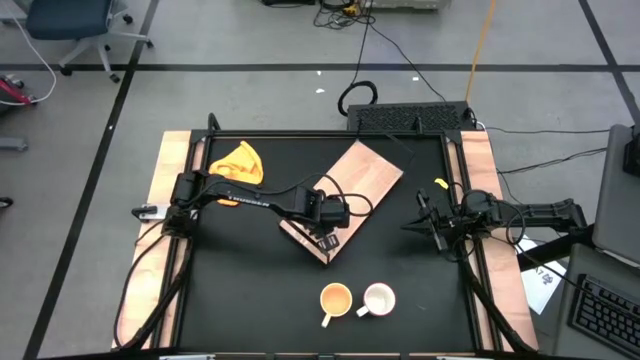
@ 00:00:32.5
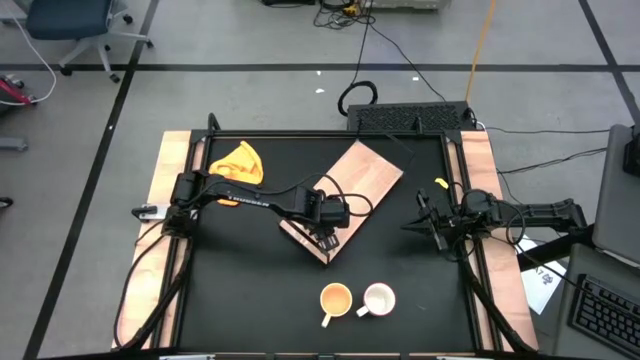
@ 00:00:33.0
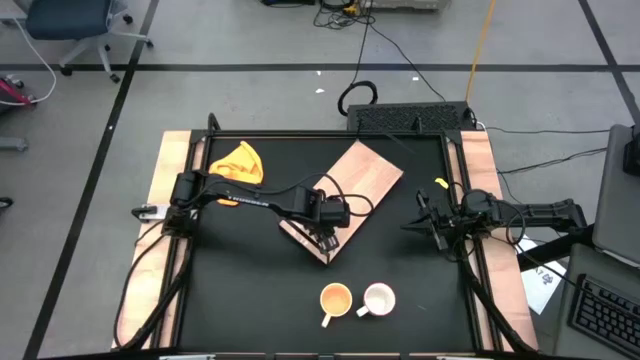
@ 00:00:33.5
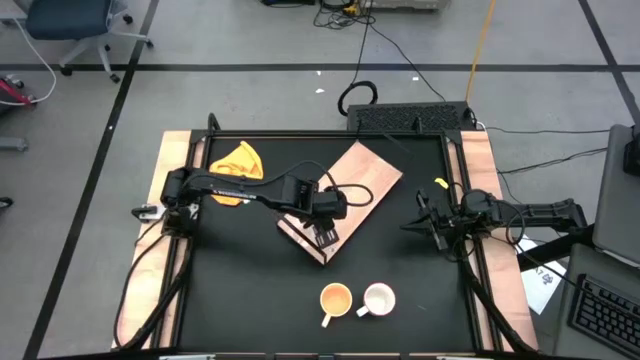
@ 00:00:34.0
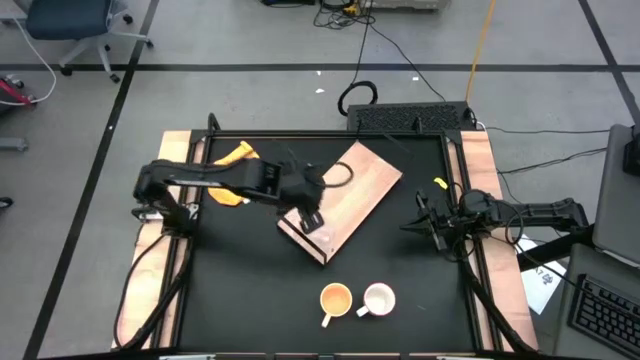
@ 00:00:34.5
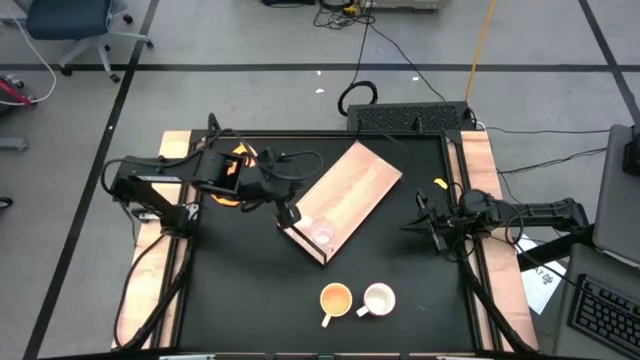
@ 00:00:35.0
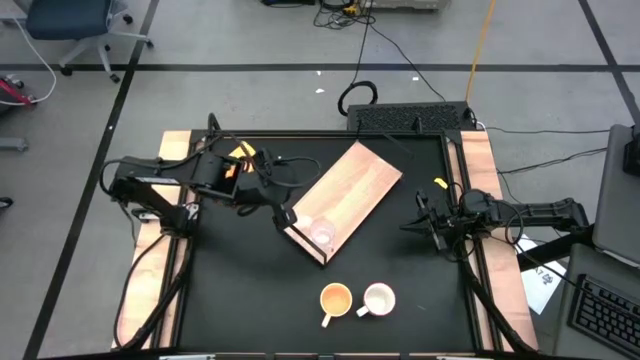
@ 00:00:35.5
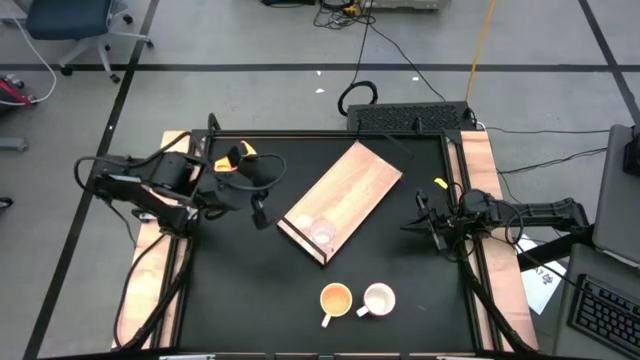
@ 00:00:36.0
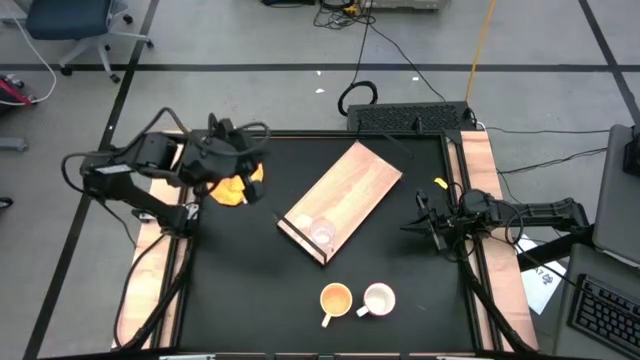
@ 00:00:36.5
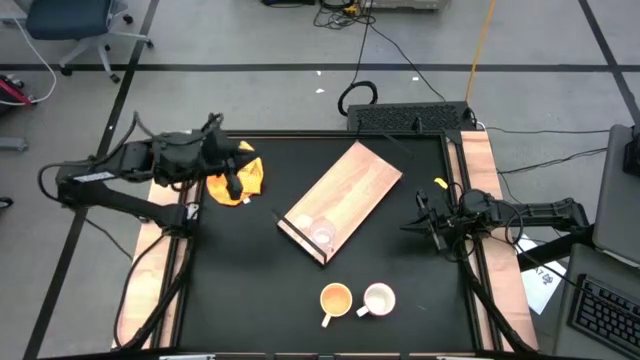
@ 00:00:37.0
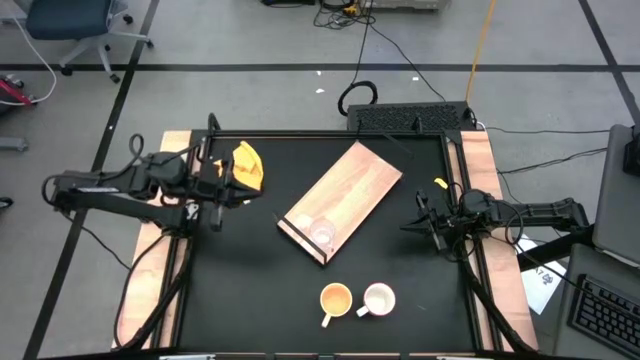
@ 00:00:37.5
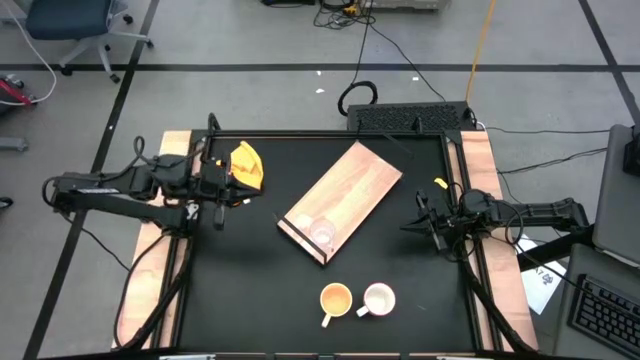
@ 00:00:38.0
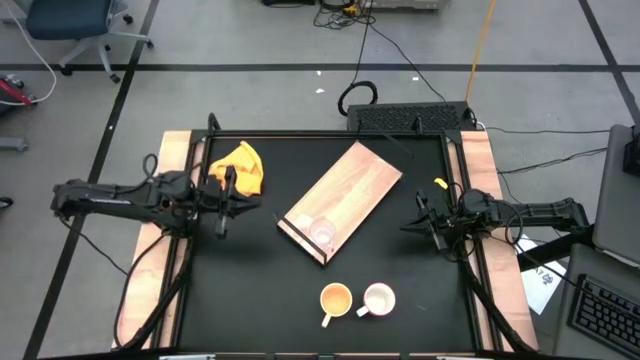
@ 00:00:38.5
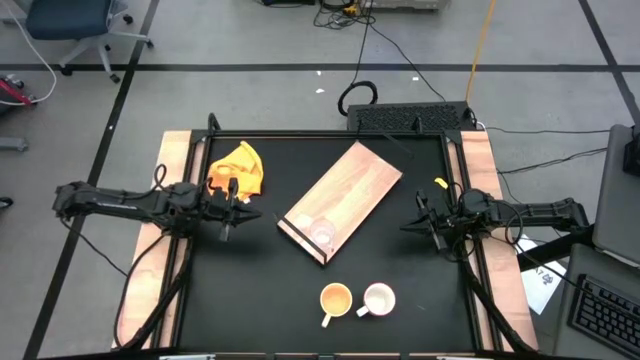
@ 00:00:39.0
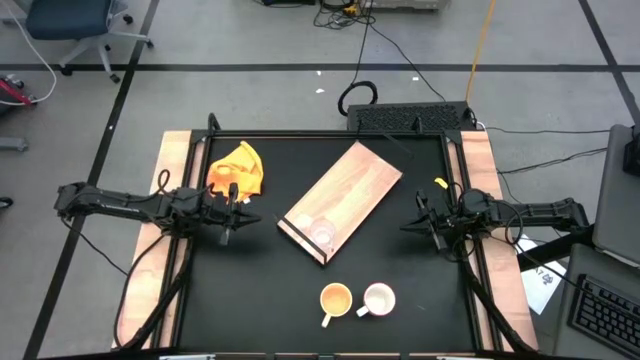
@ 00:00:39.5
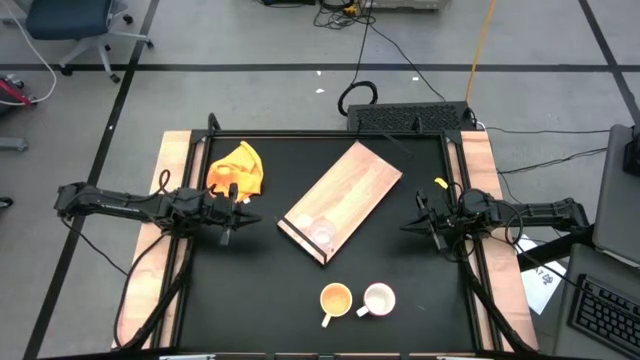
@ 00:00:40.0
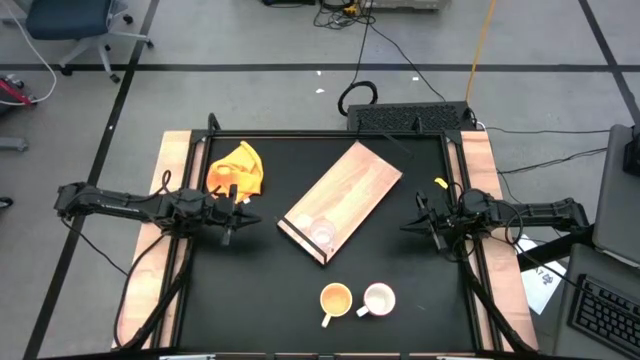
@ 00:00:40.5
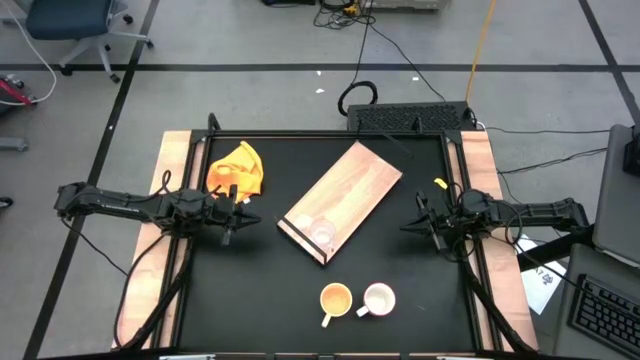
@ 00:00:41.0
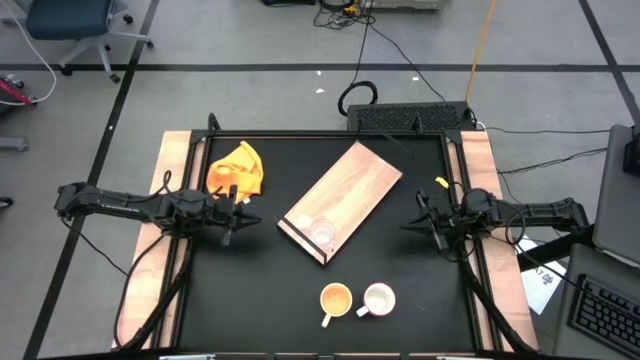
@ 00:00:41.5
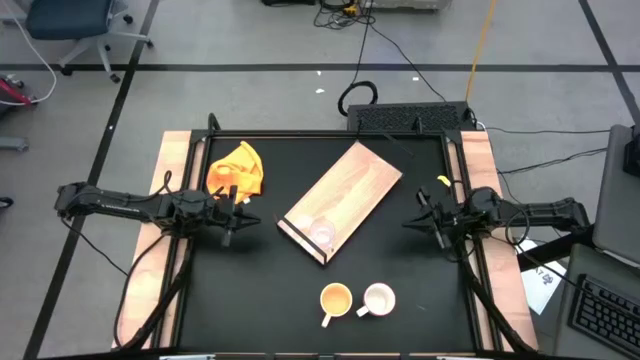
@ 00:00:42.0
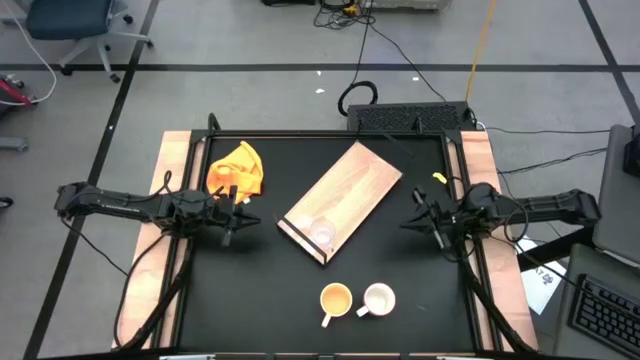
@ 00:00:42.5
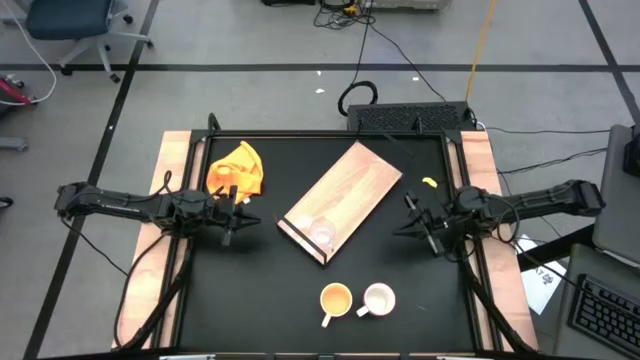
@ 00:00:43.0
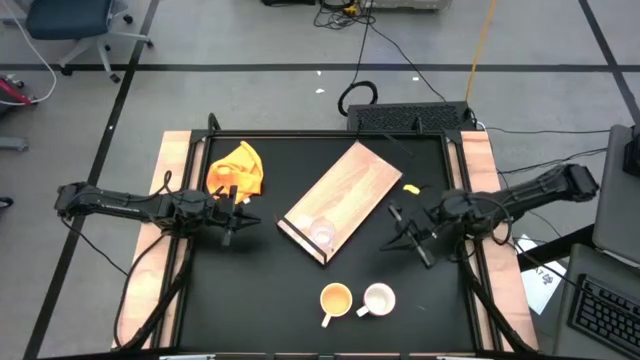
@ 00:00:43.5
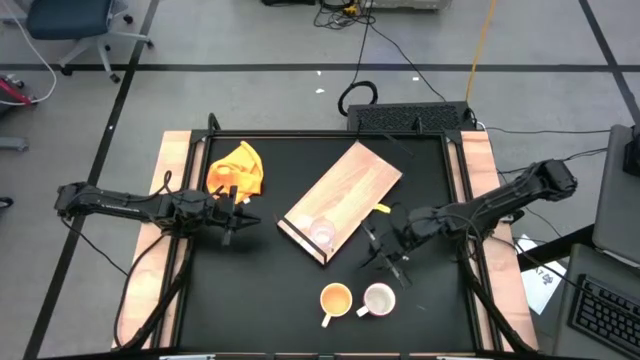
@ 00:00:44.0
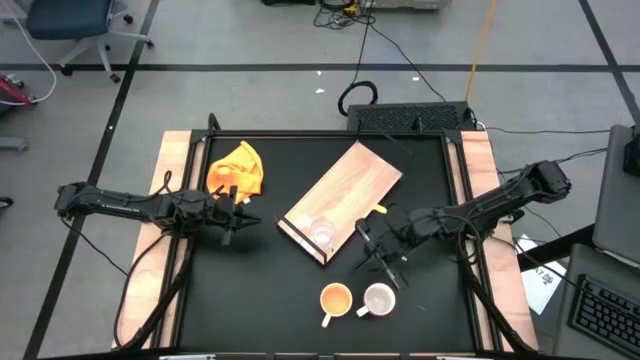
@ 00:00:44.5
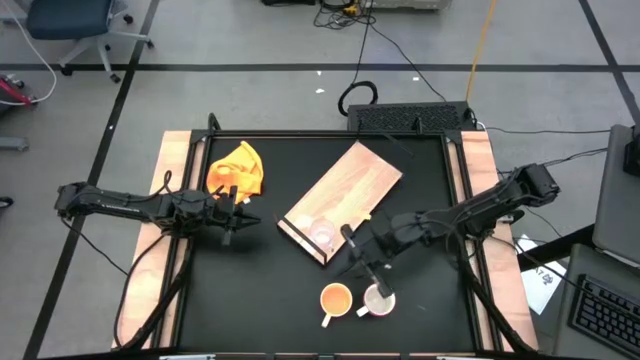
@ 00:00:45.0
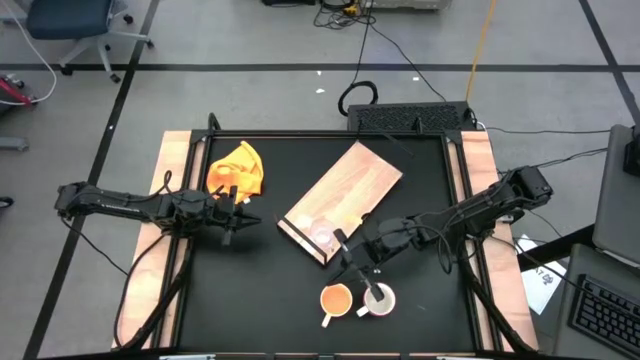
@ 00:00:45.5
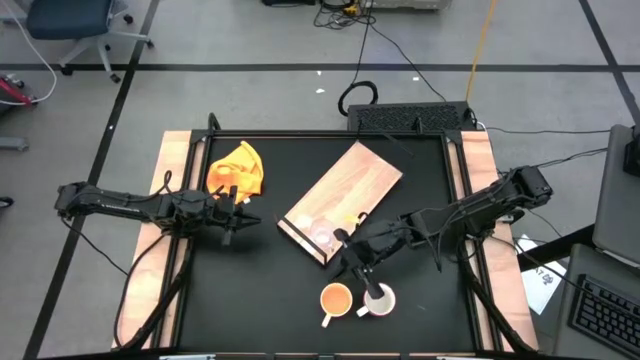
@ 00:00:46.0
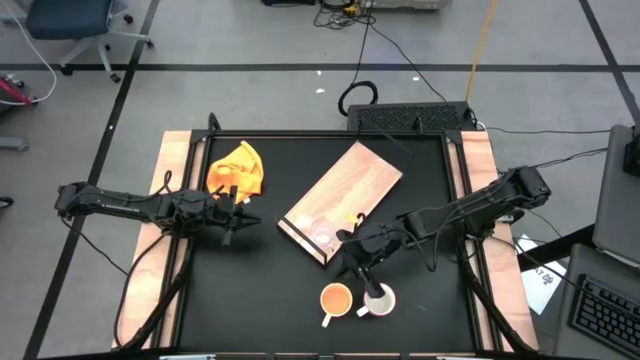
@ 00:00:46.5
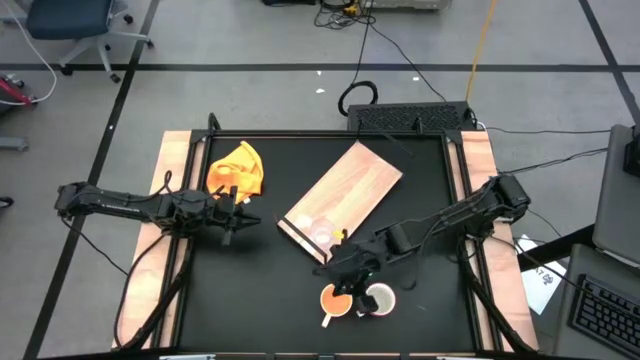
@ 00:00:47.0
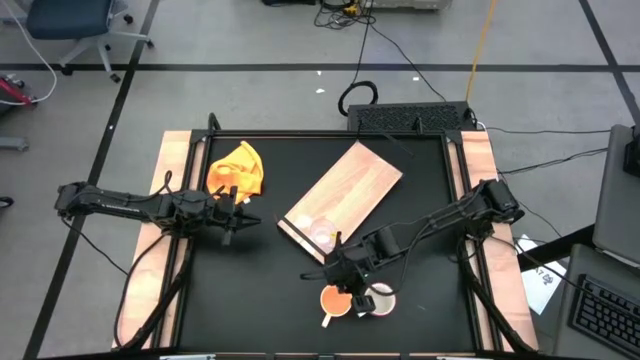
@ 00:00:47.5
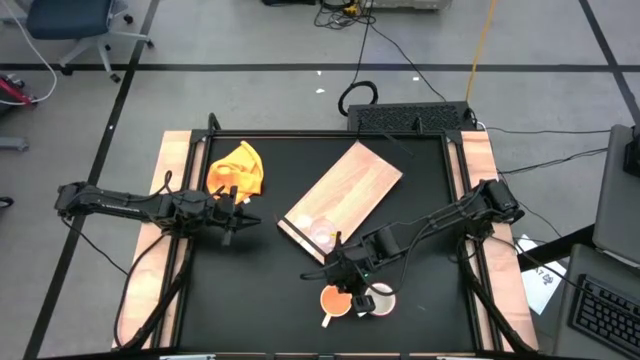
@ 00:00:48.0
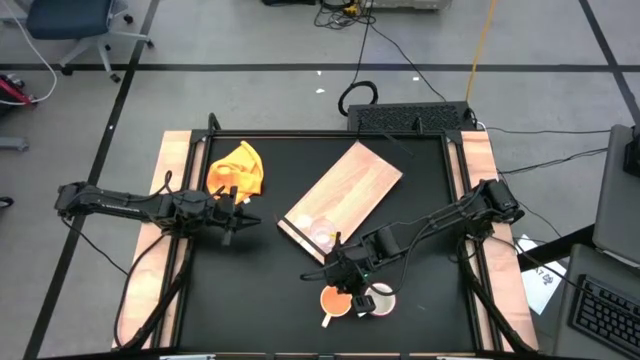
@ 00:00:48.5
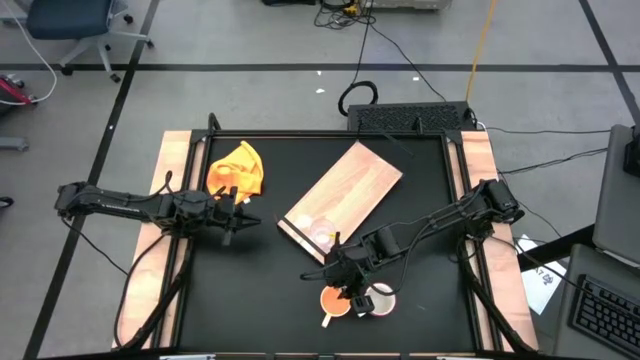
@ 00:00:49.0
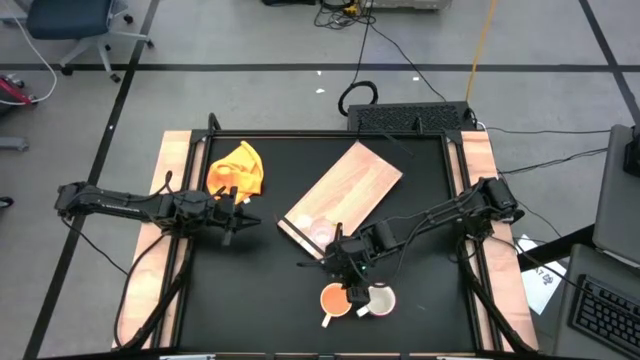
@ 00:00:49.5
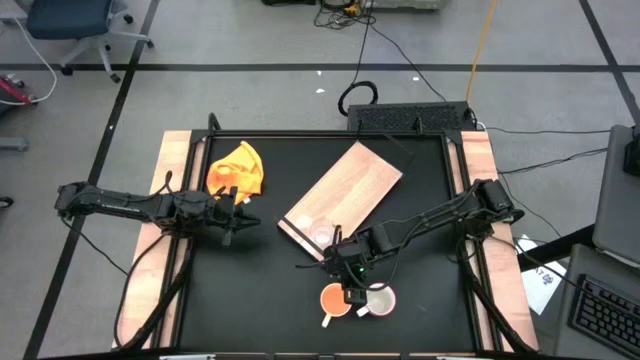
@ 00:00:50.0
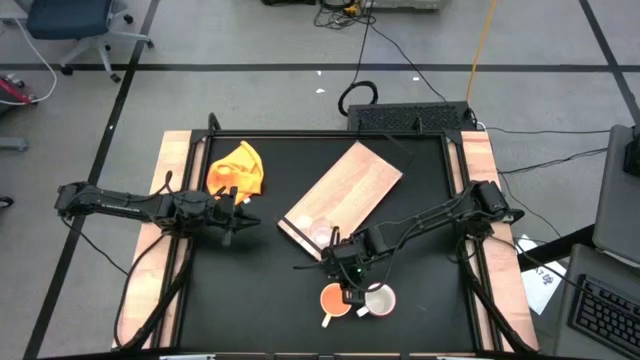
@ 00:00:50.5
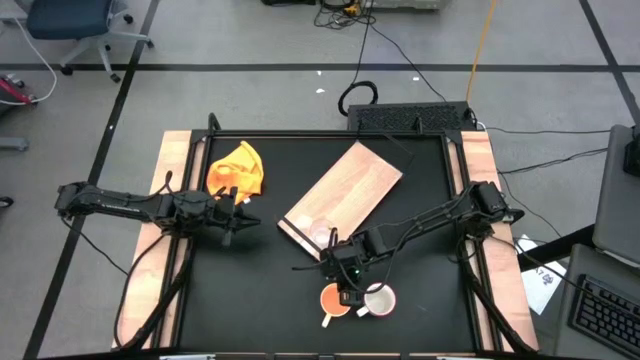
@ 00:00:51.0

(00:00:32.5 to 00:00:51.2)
Task: Stack small to large cups/mugs on shelf
Put the orange mug on the shelf

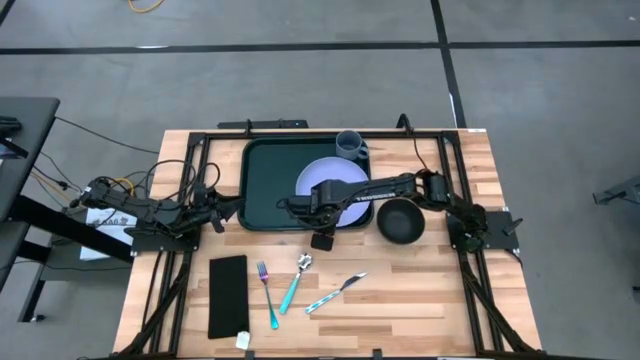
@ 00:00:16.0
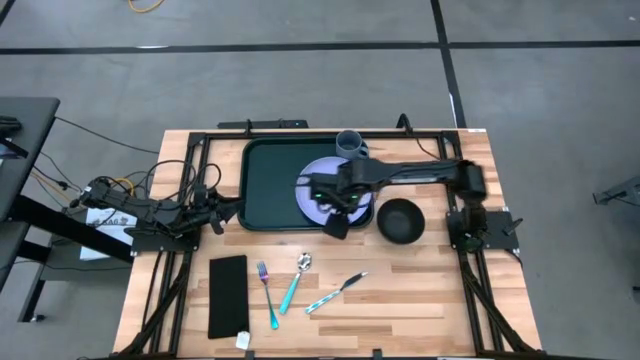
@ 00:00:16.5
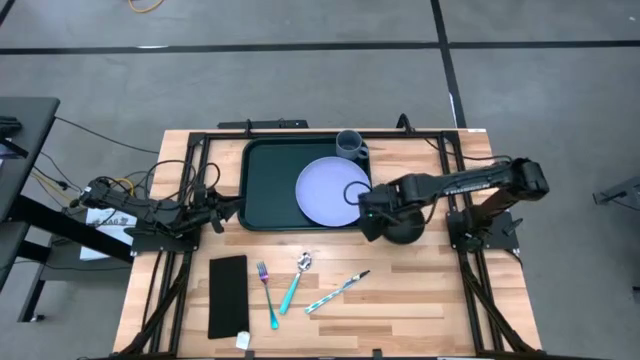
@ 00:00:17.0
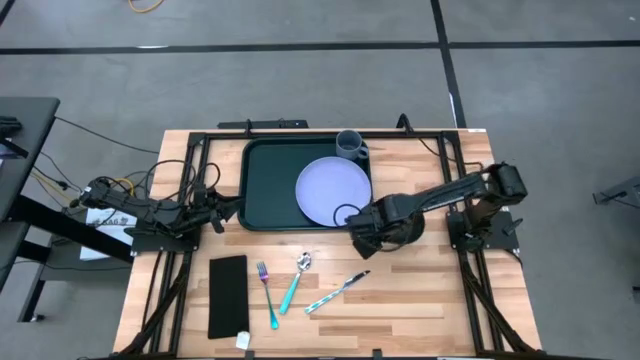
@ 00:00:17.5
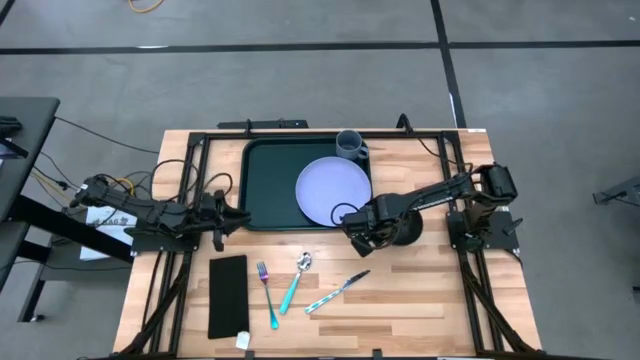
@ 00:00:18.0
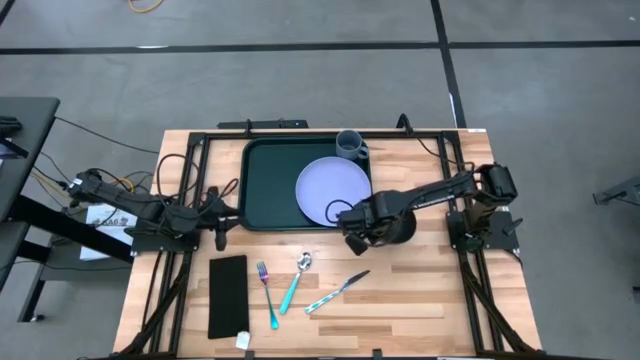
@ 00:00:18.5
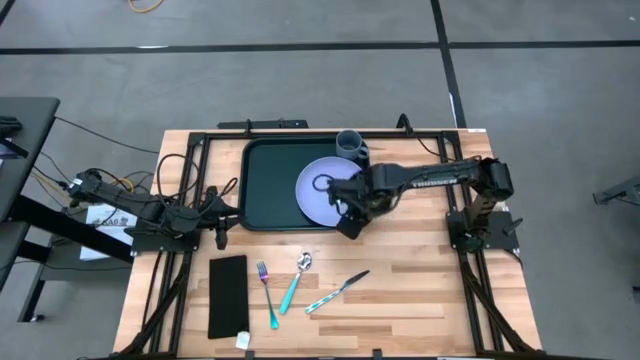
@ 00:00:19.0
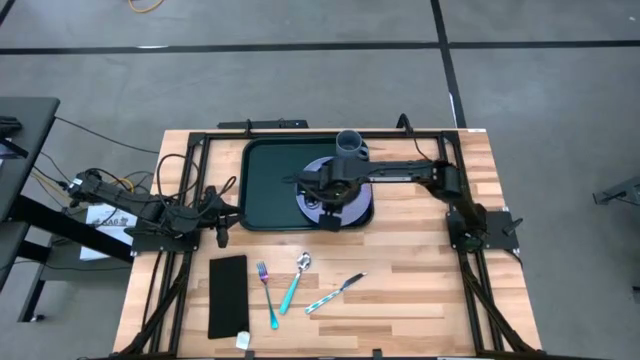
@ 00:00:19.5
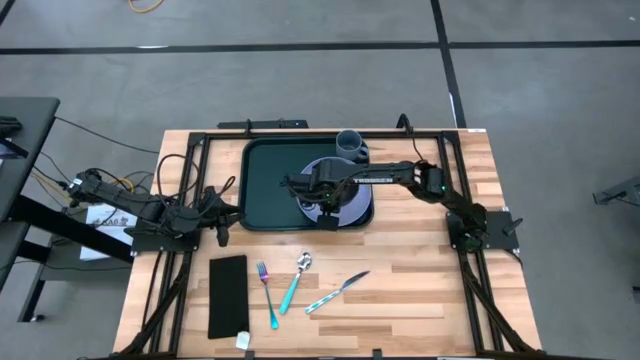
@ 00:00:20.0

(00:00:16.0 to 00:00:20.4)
Task: Set up tray
Put the black bowl on top of the purple plate
